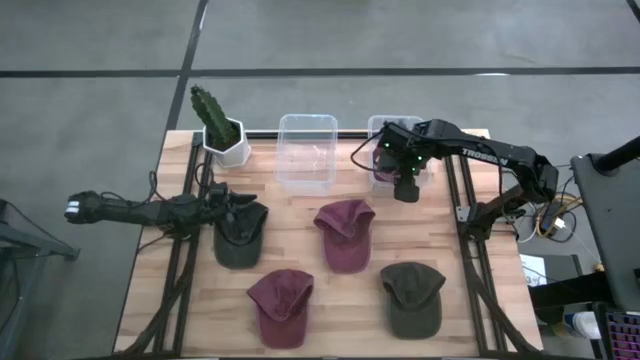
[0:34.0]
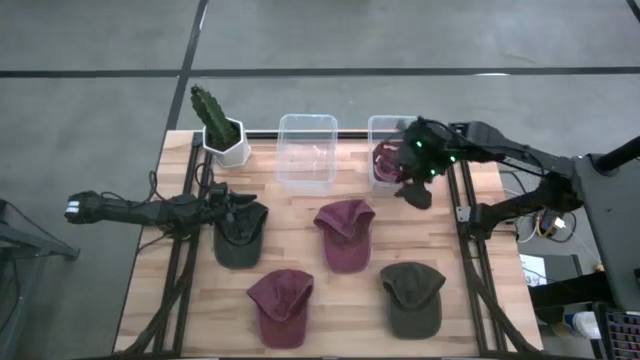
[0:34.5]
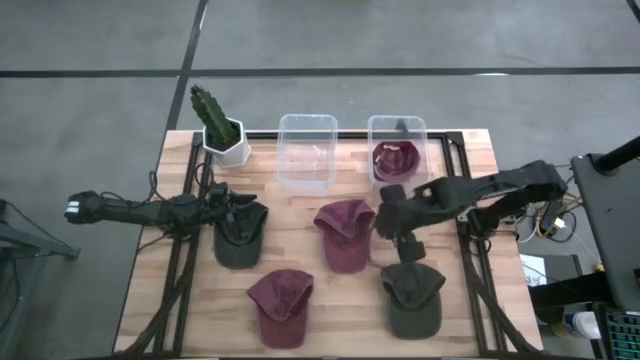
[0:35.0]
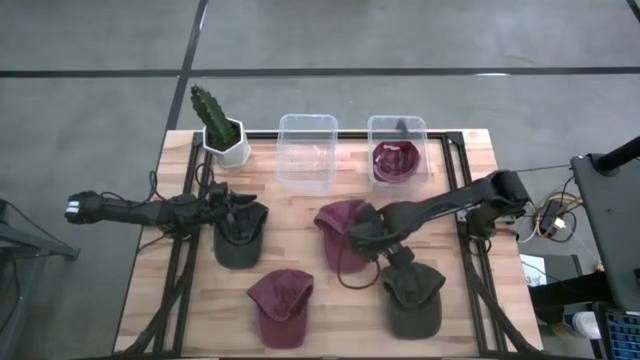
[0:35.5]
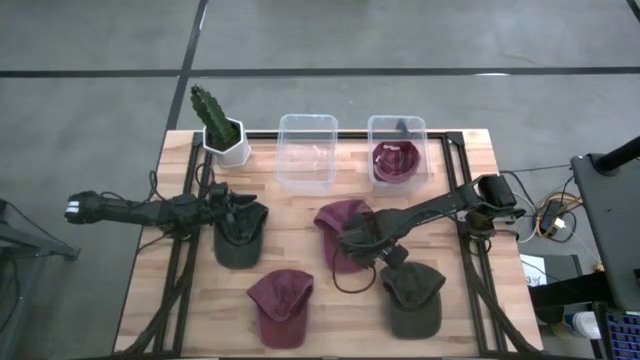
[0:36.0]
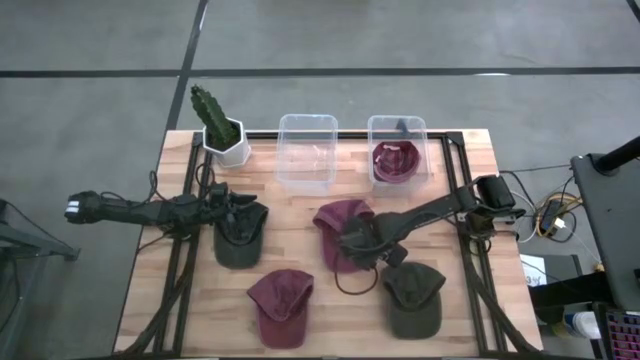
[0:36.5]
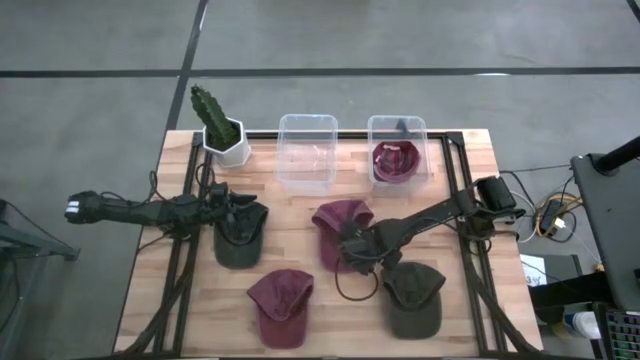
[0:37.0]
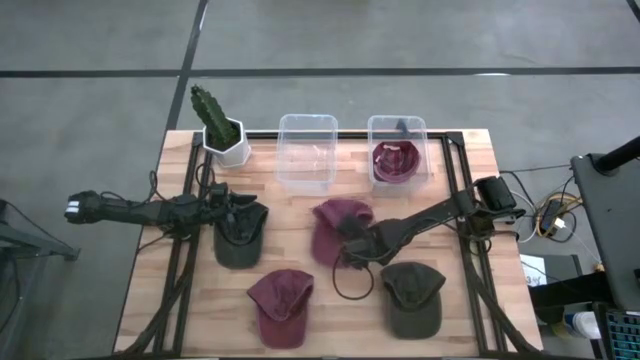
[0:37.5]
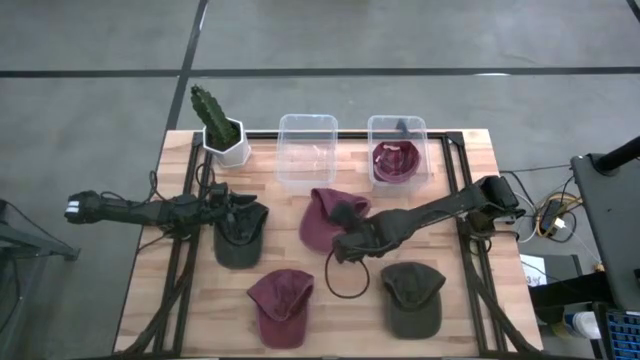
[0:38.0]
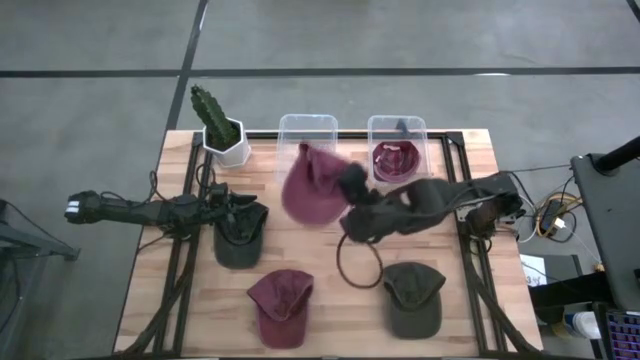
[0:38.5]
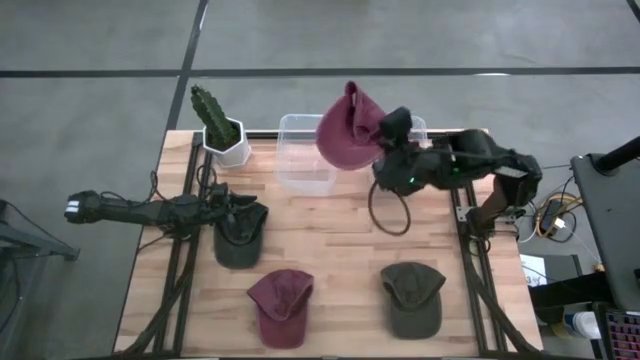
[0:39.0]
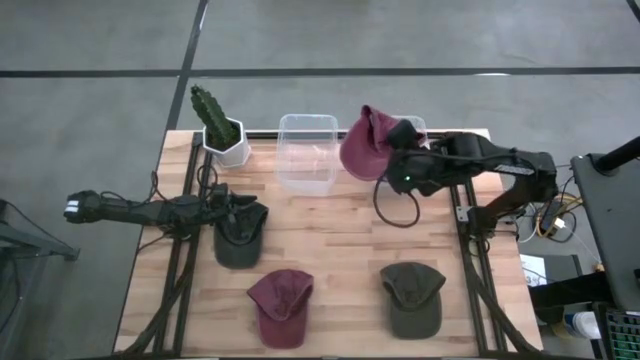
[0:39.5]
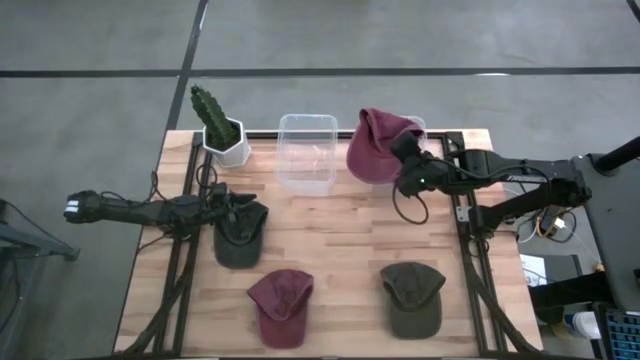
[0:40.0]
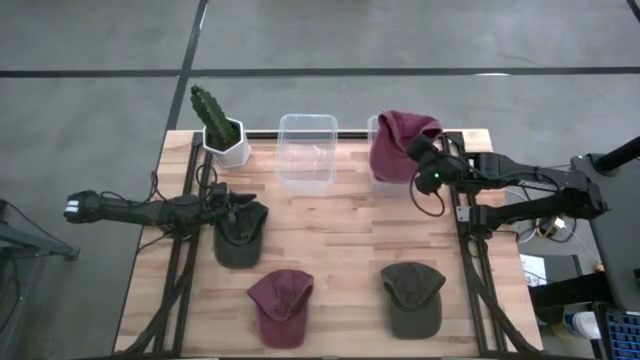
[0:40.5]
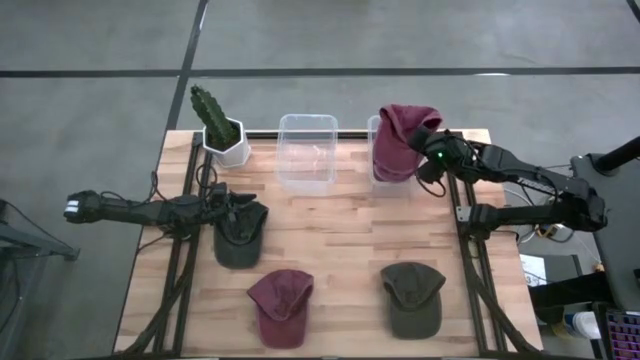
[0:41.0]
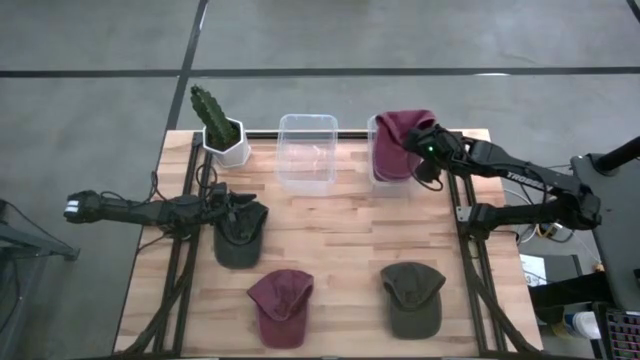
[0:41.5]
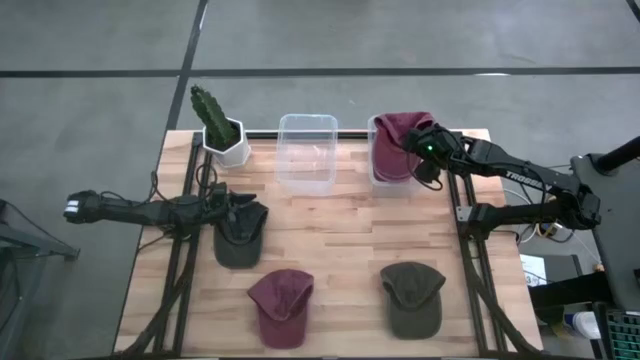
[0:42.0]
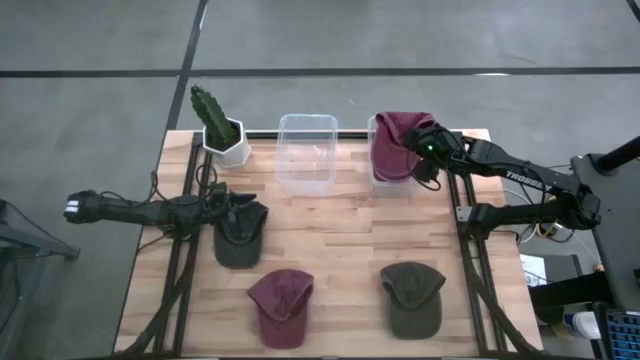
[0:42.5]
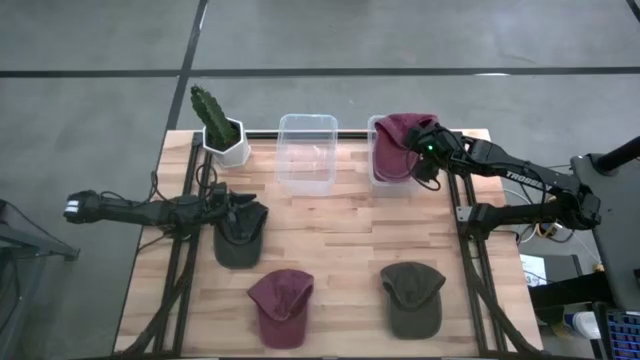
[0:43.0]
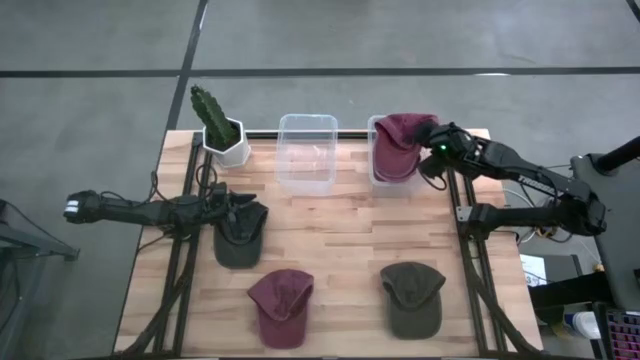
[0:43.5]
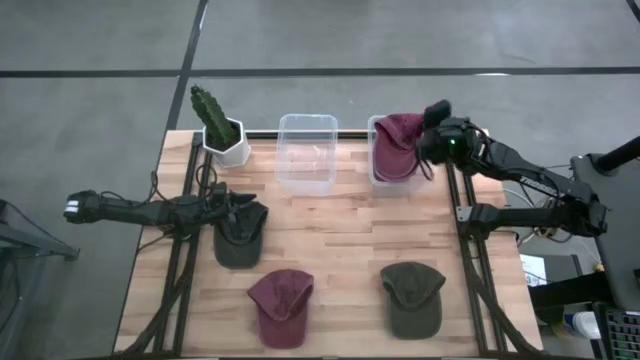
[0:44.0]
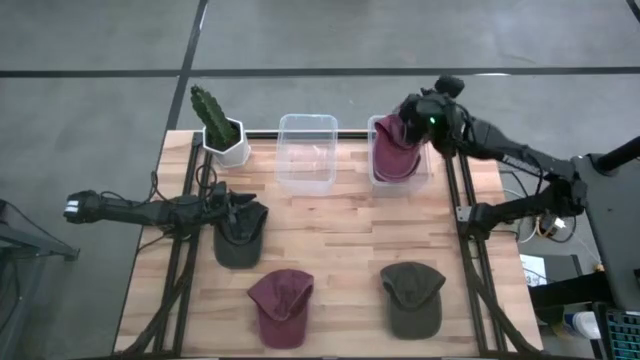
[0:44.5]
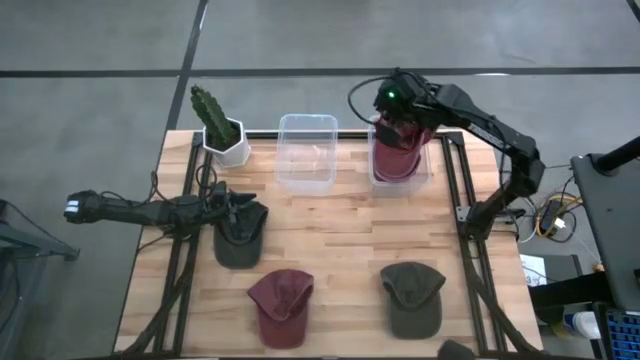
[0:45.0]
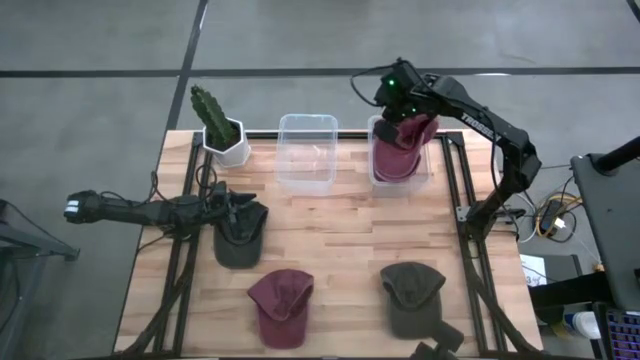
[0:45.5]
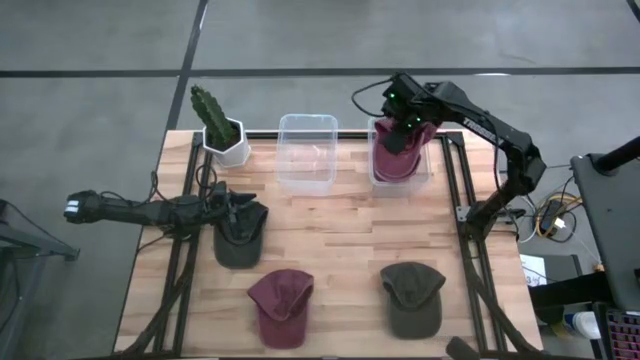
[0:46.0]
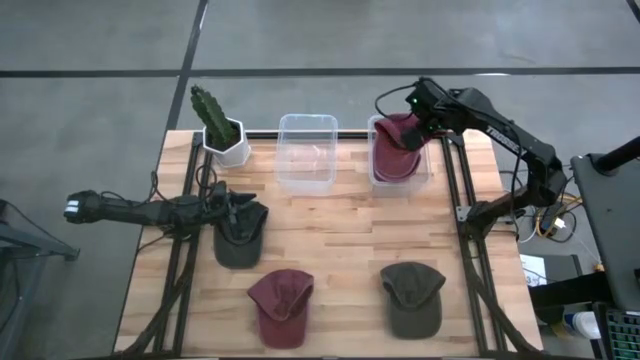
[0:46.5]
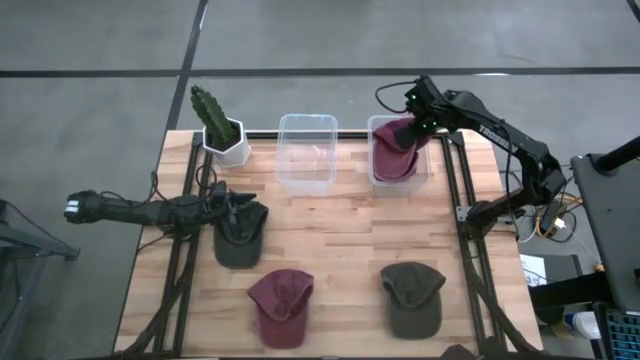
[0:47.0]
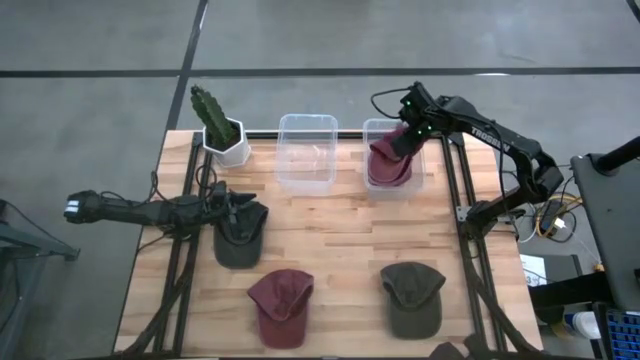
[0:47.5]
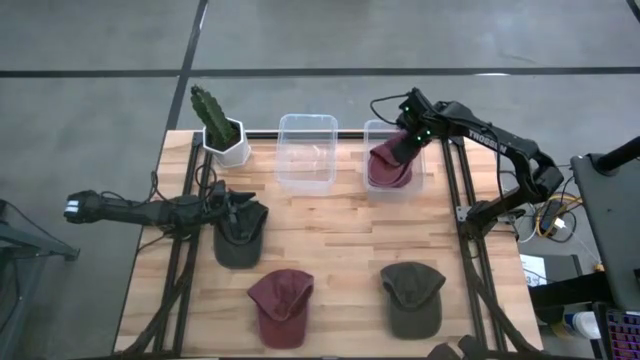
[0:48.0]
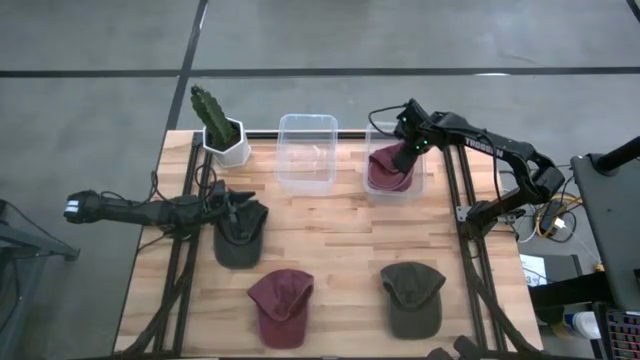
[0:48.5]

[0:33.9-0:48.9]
Task: Pick & Place hat
Put the right red cap into the right transparent bin

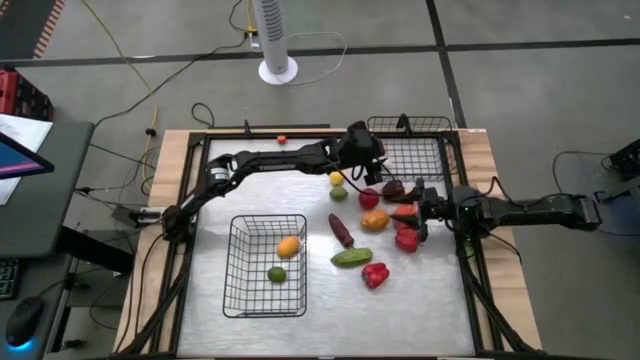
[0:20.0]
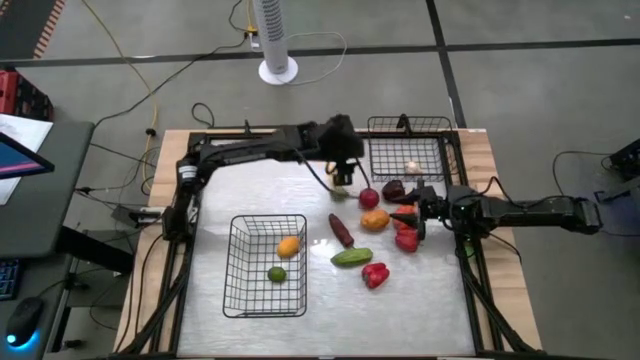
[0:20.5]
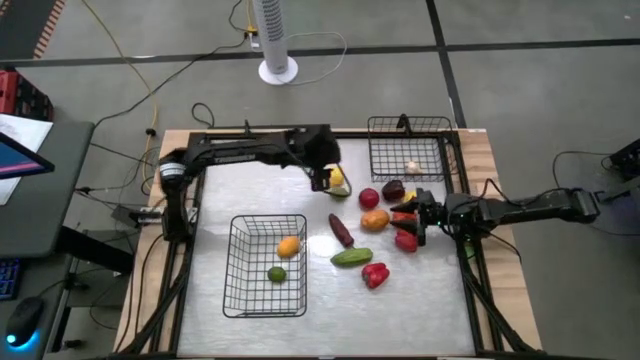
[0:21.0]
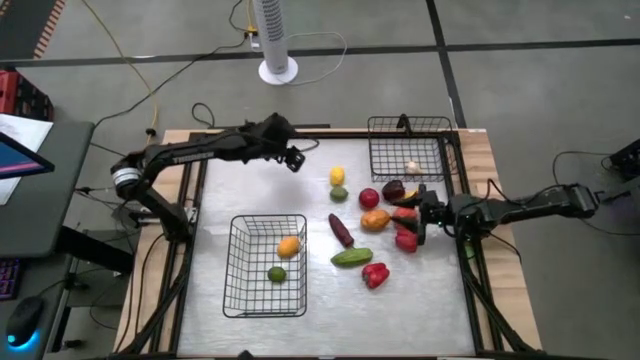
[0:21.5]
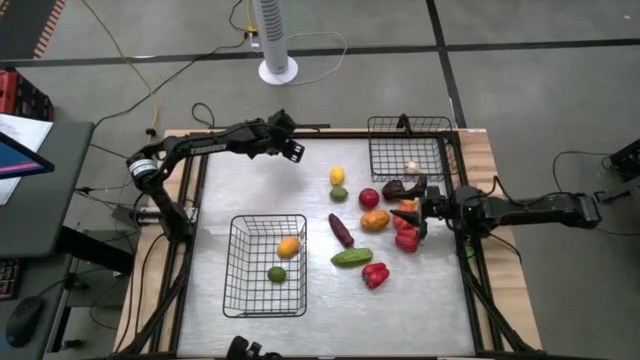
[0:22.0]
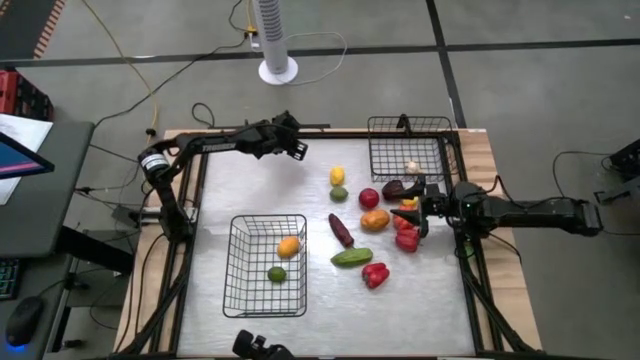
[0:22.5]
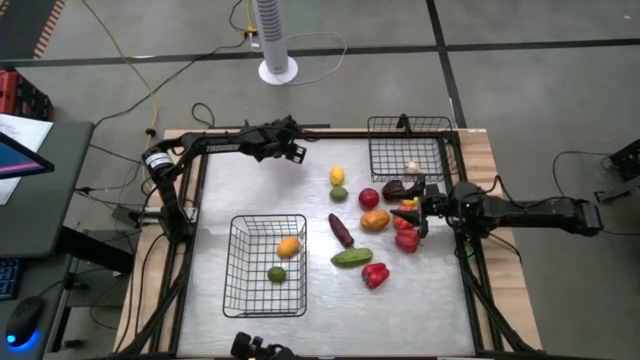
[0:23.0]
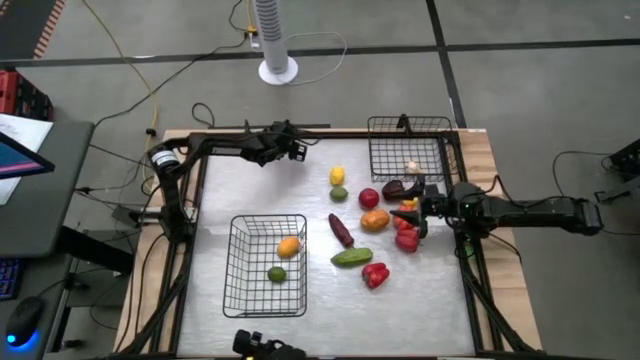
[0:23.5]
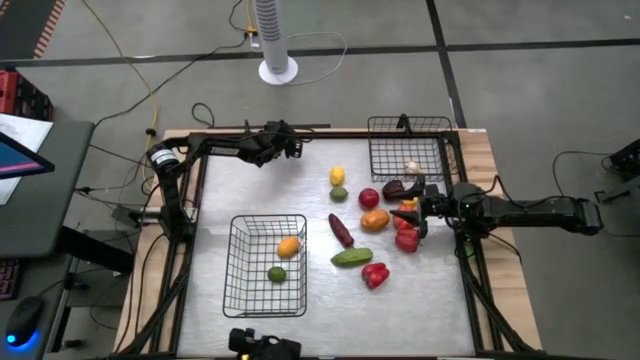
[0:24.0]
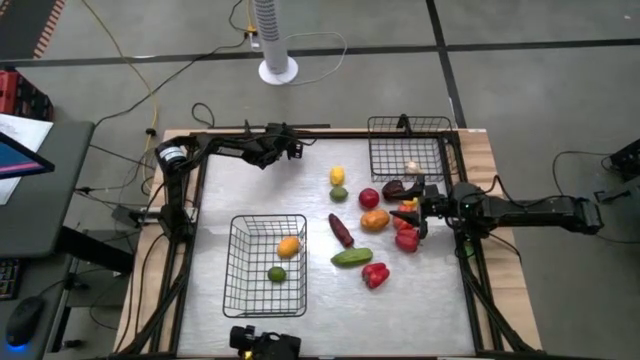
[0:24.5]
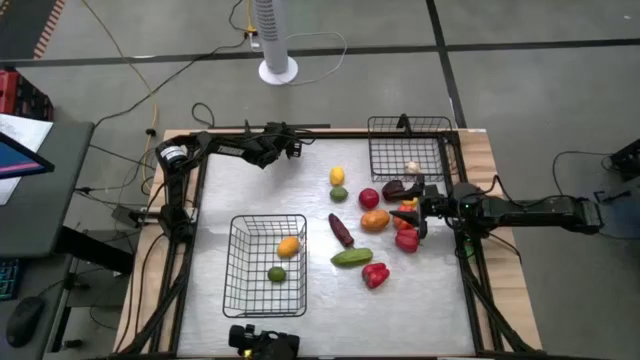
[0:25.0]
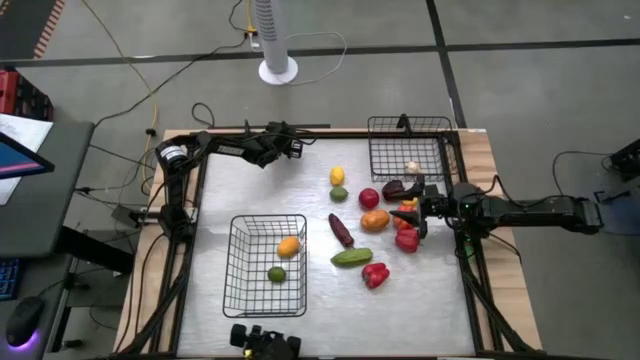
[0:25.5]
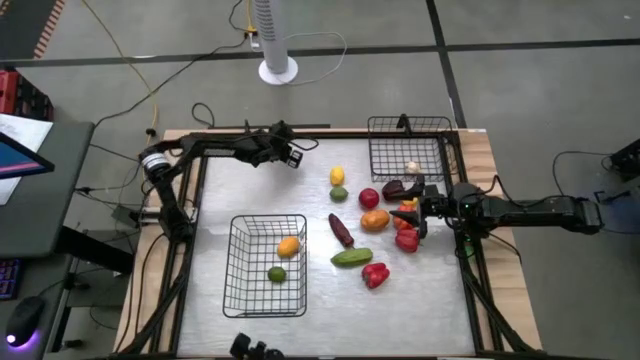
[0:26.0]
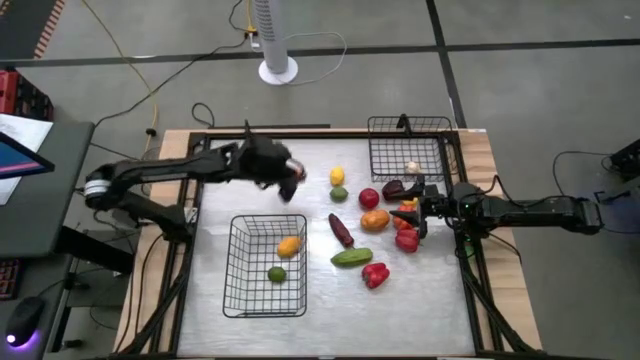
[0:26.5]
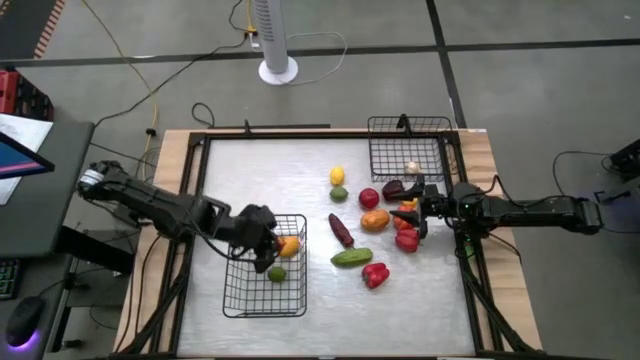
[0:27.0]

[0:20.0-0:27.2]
Task: Sort produce into baskets
Put the small tomato into the bottom wire basket
